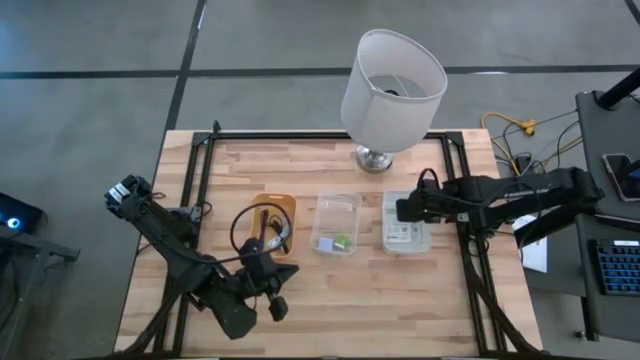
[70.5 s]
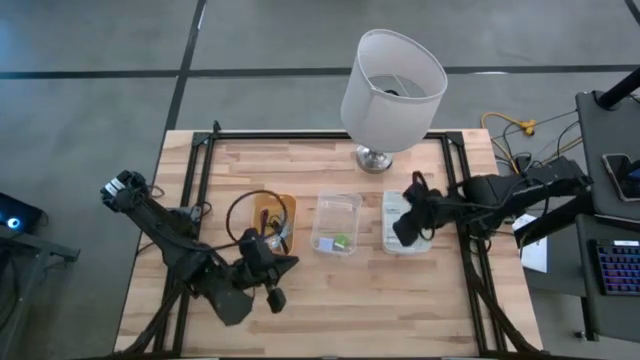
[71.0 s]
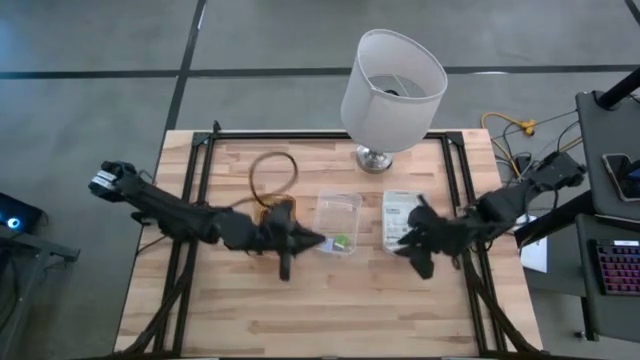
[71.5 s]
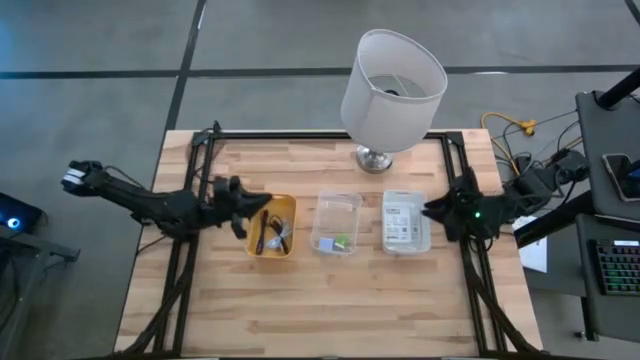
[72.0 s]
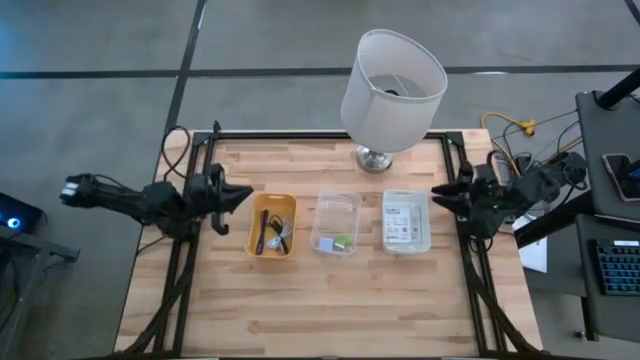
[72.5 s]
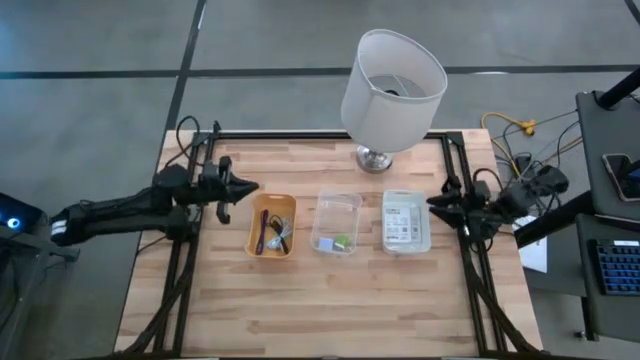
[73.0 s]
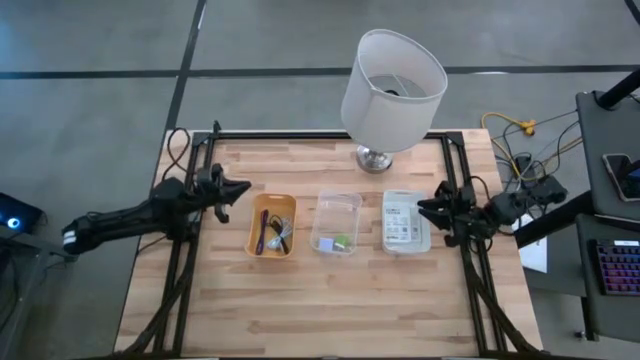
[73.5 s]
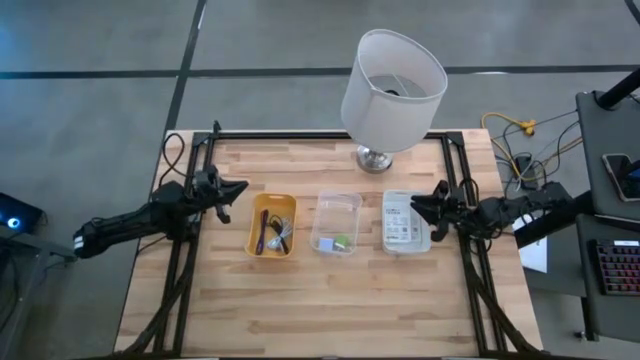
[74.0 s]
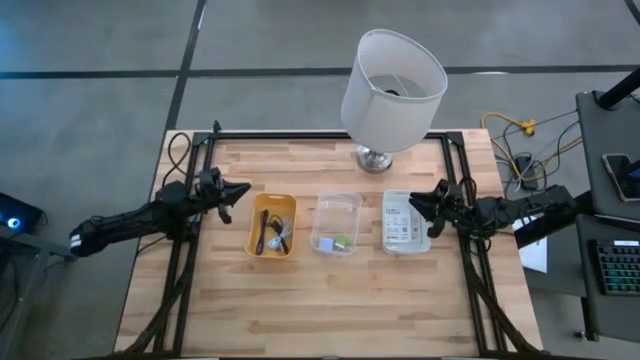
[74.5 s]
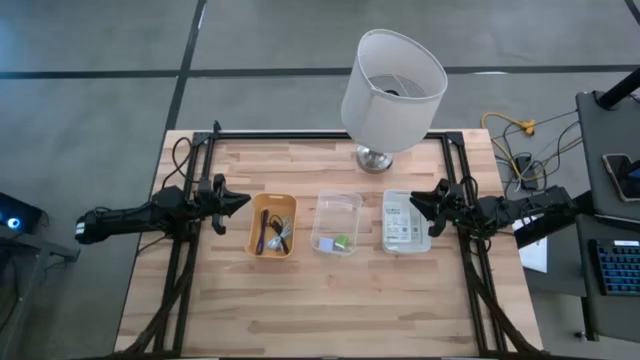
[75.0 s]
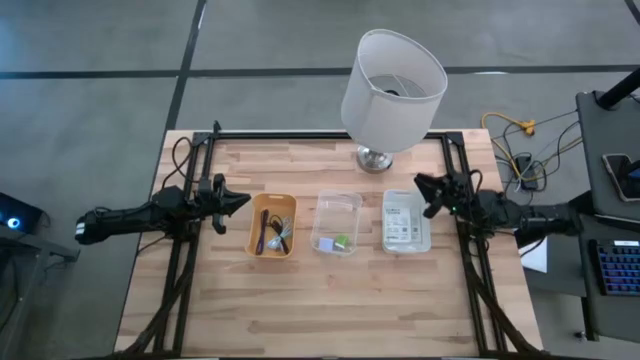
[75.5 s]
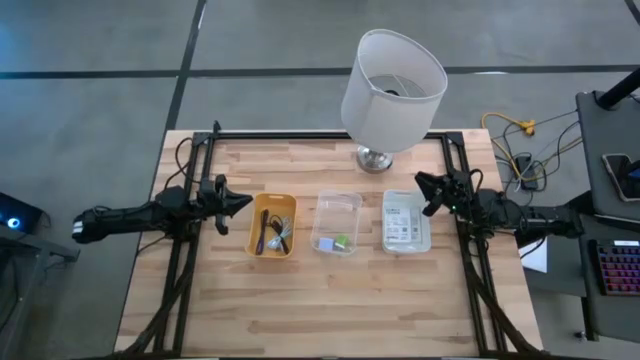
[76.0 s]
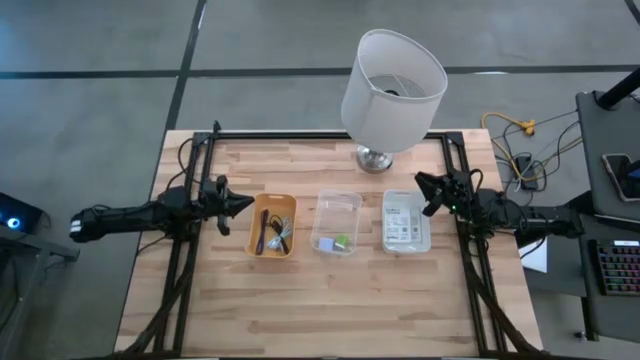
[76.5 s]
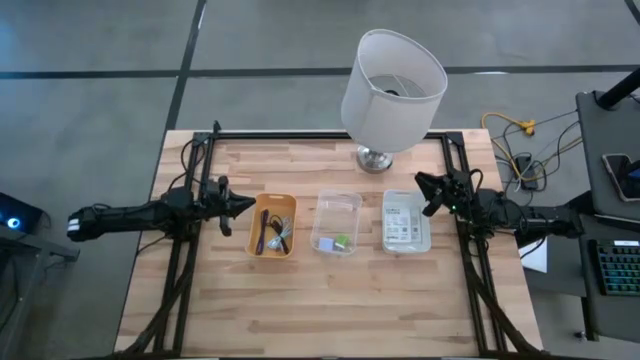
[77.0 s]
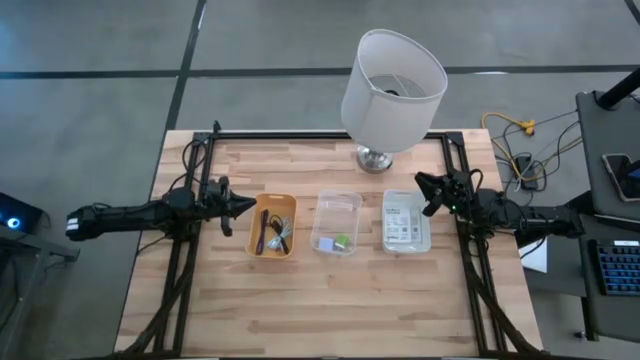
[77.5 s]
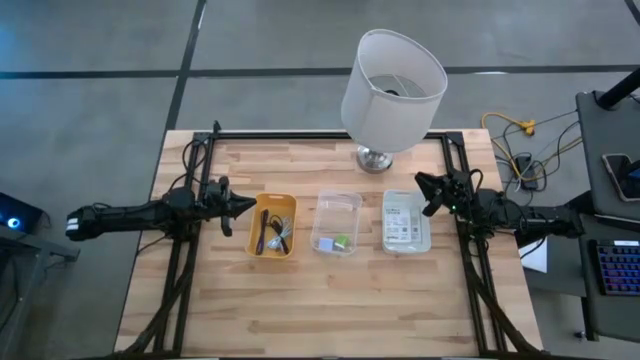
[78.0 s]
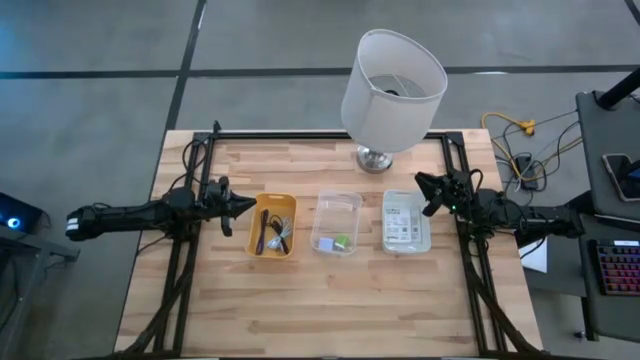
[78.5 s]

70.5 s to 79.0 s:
Task: Pick and place items into bin
Return to home position

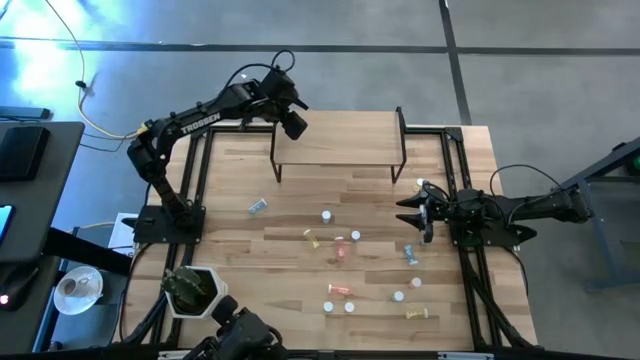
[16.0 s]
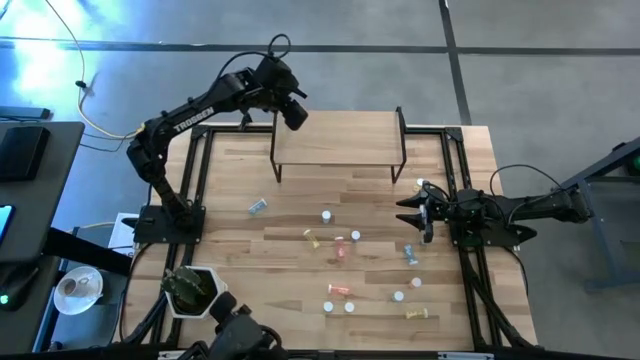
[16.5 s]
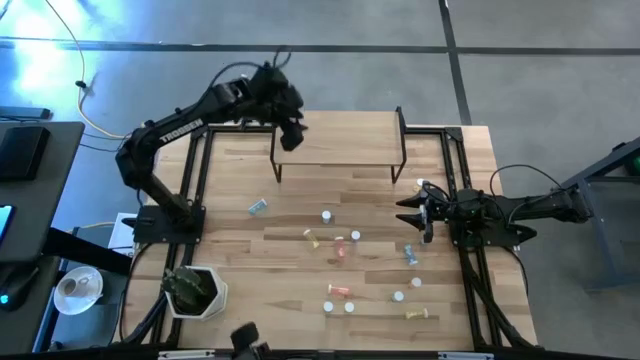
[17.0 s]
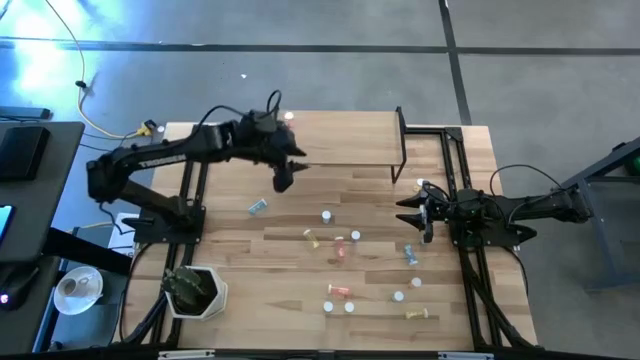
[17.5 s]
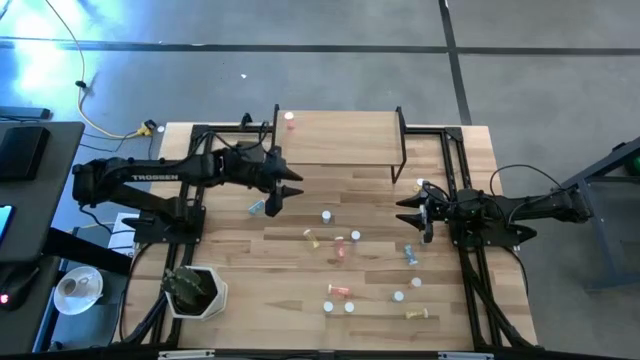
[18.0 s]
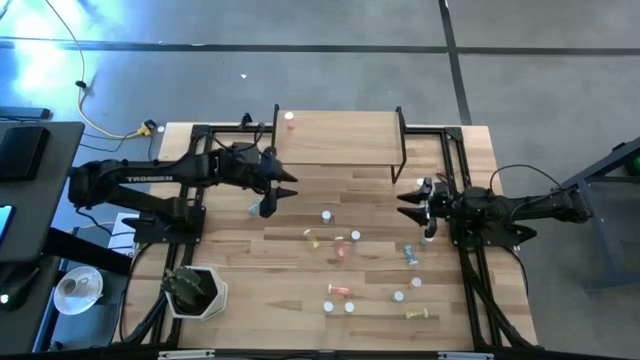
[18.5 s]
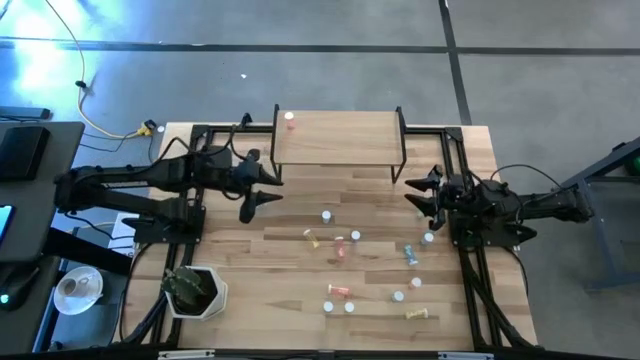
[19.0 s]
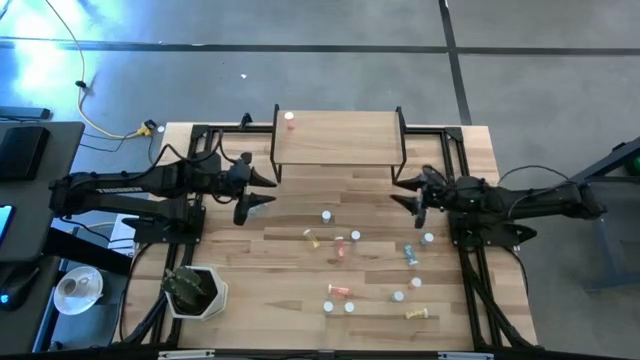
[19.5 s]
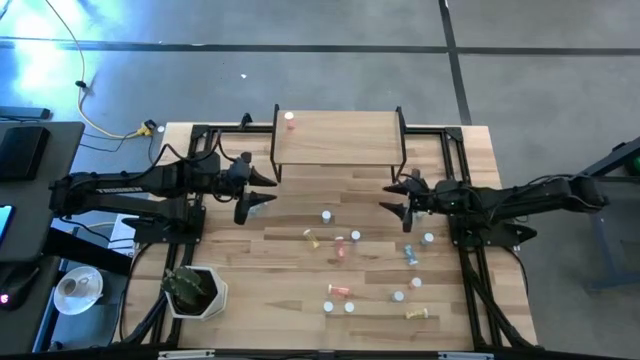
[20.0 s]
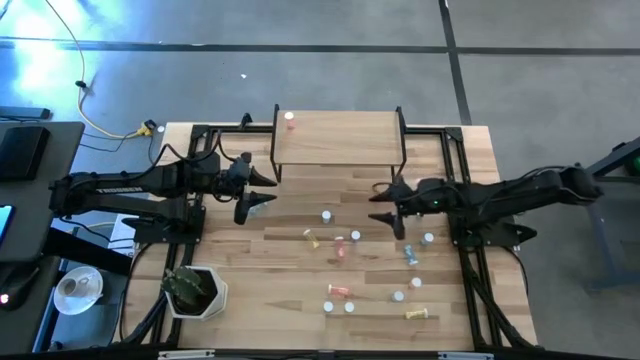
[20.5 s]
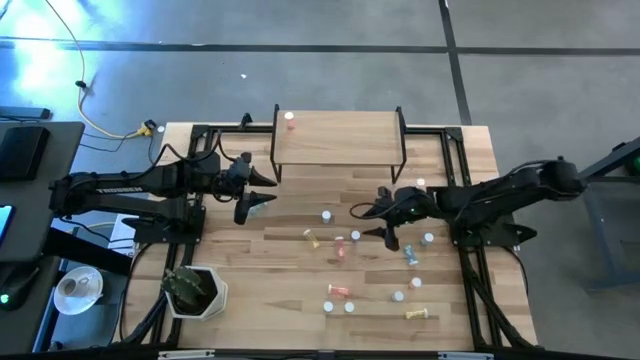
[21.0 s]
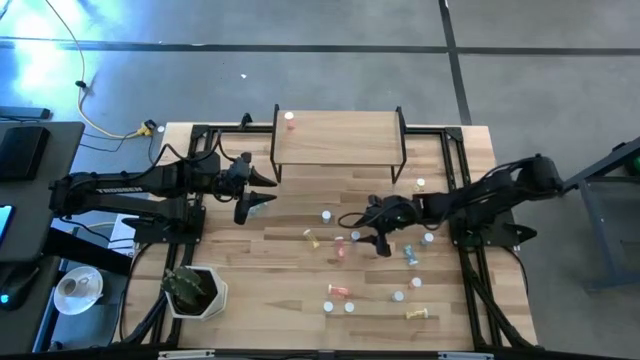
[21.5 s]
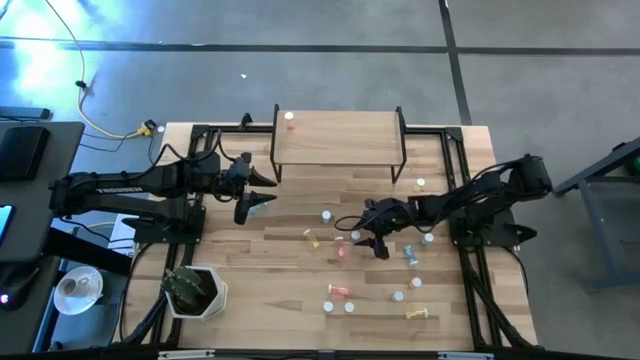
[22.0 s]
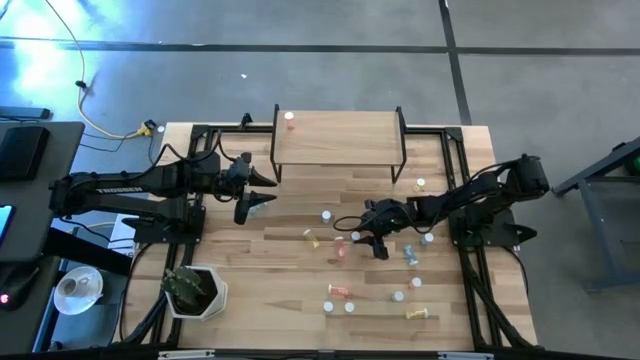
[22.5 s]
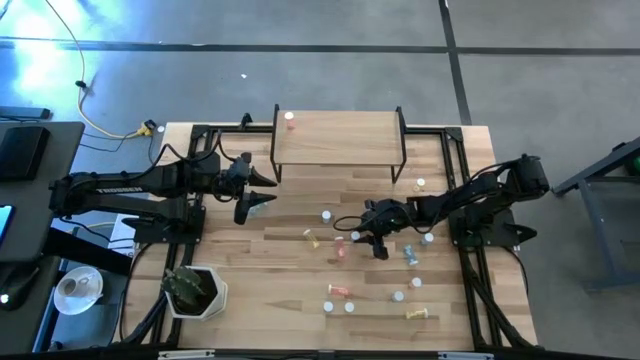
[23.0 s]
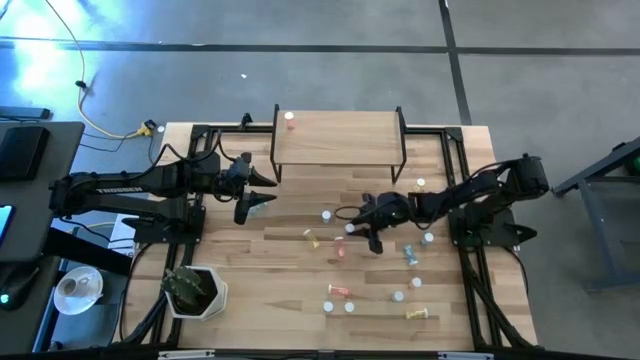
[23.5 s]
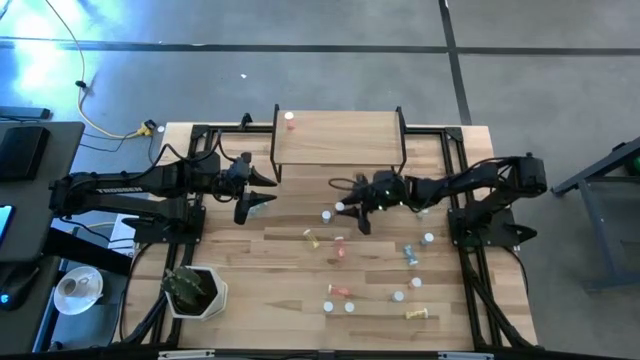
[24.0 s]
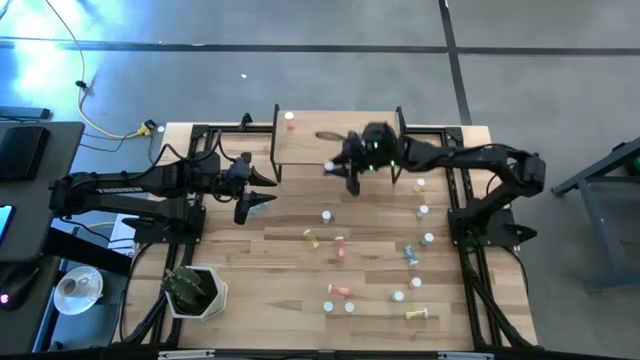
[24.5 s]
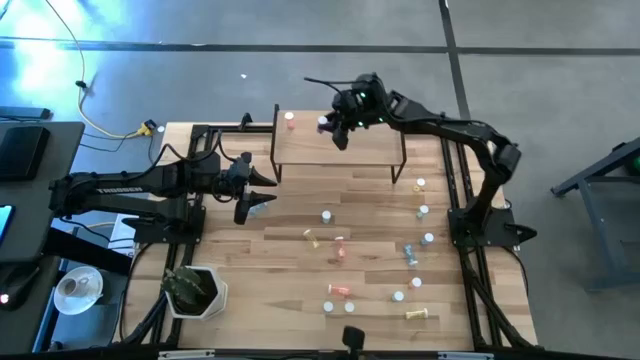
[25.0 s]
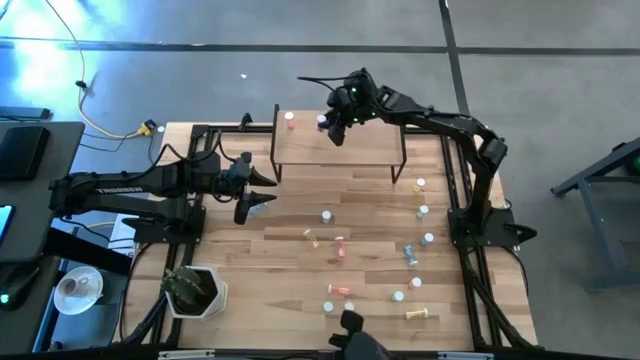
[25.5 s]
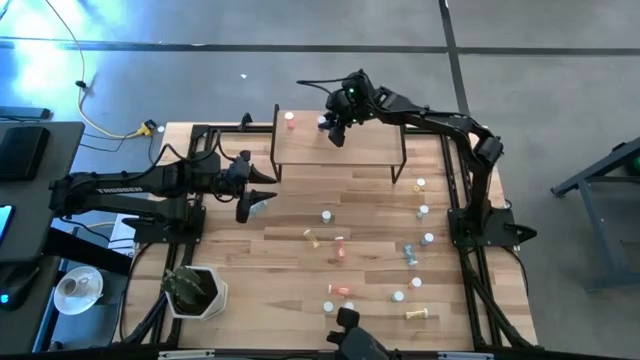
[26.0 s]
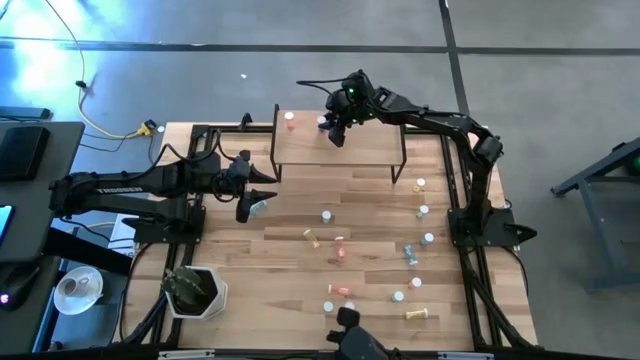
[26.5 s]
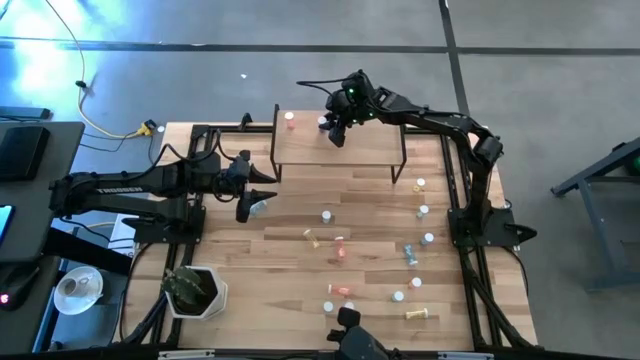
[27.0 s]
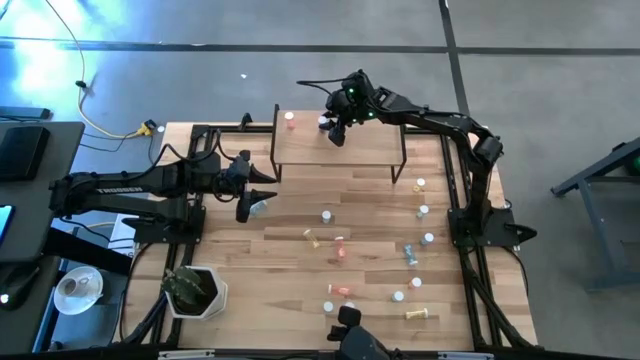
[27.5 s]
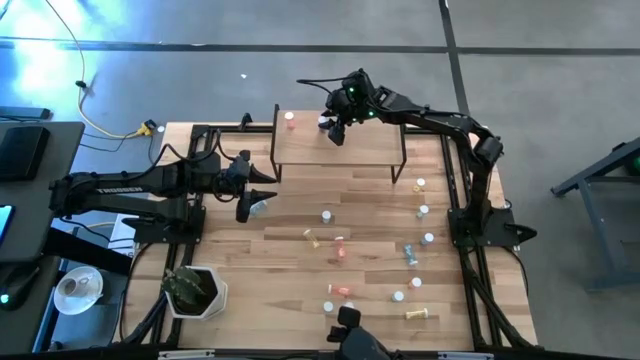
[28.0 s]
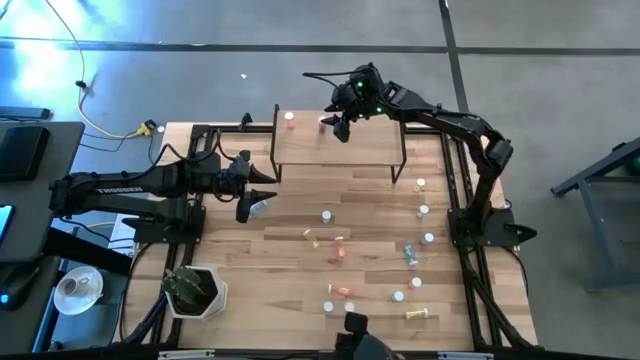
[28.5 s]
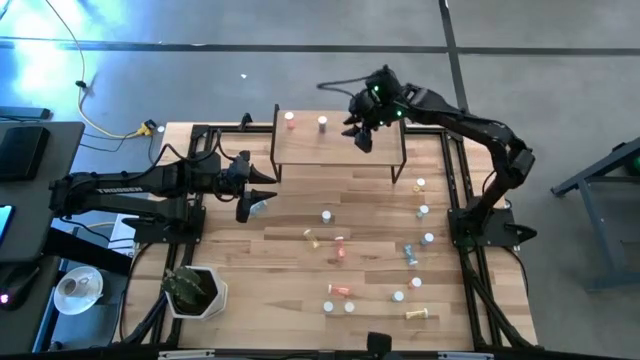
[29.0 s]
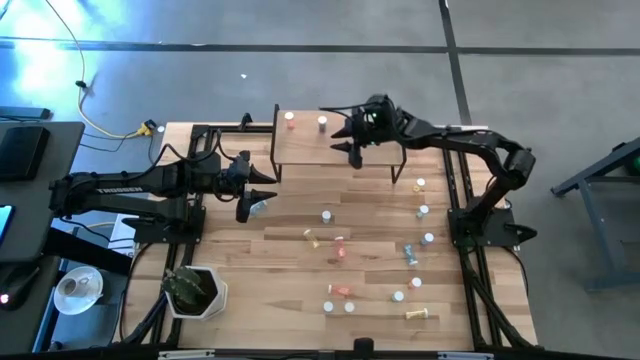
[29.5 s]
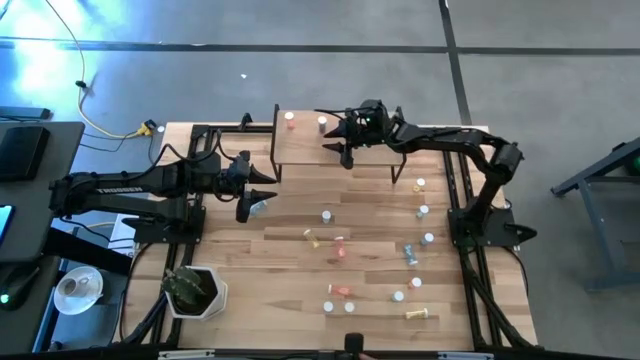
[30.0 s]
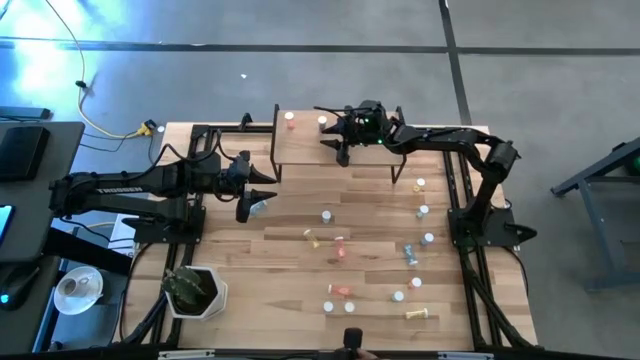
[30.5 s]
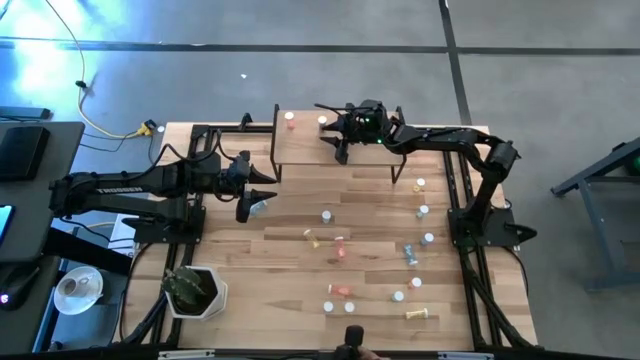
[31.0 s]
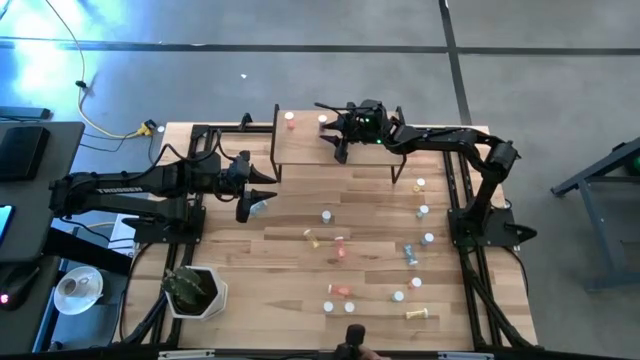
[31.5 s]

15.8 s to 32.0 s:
Task: Pick and place medicine bottles onto shelf by color
Put the blue pill bottle on the shelf
